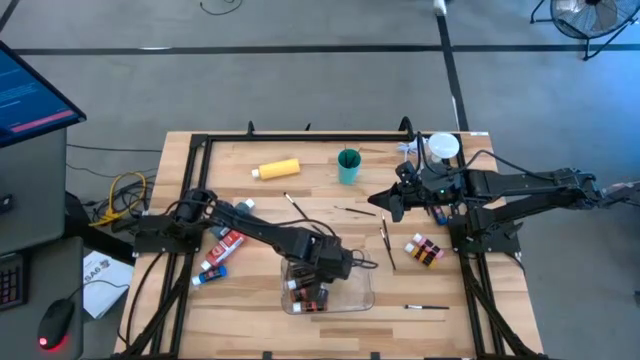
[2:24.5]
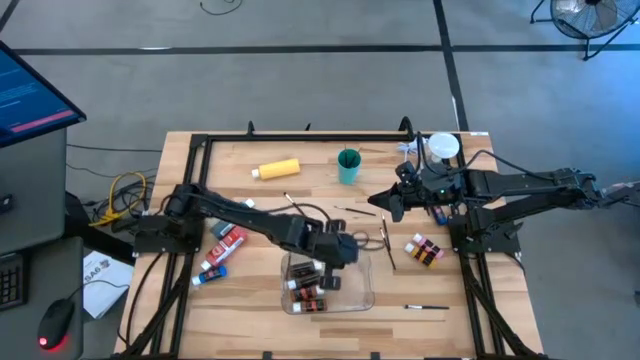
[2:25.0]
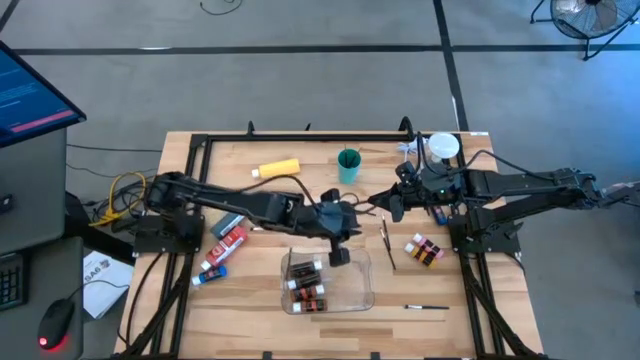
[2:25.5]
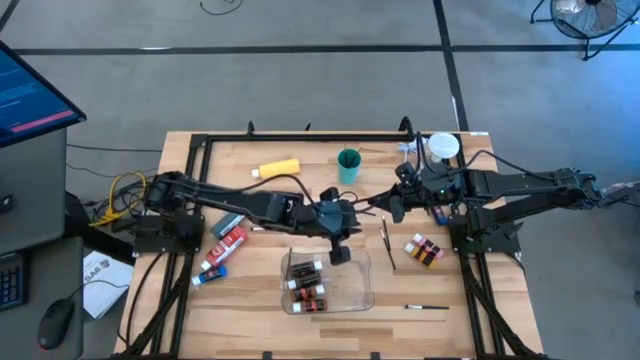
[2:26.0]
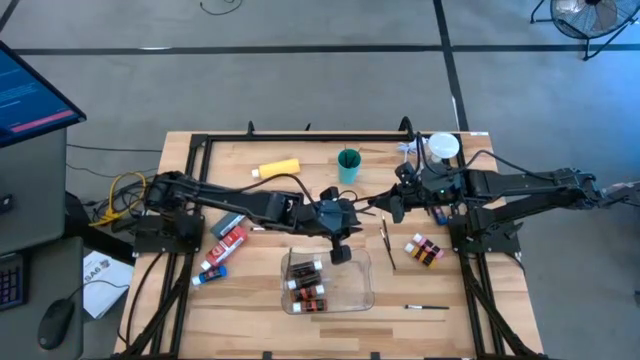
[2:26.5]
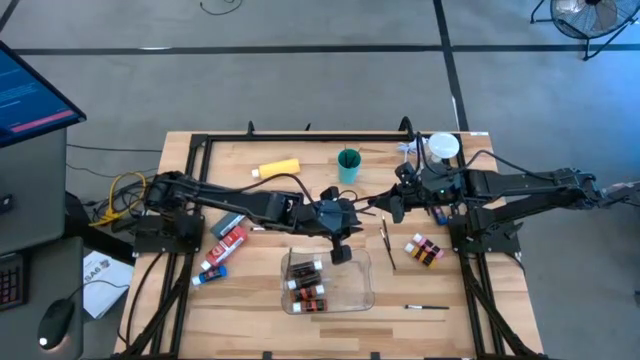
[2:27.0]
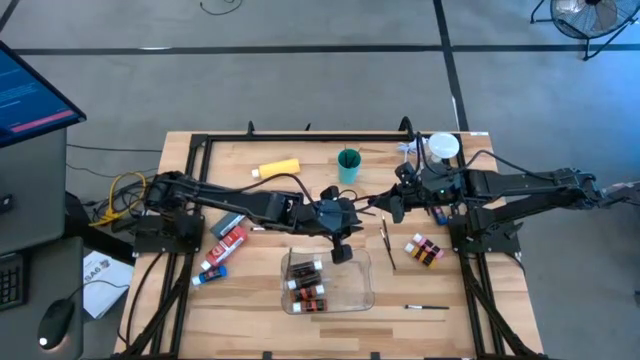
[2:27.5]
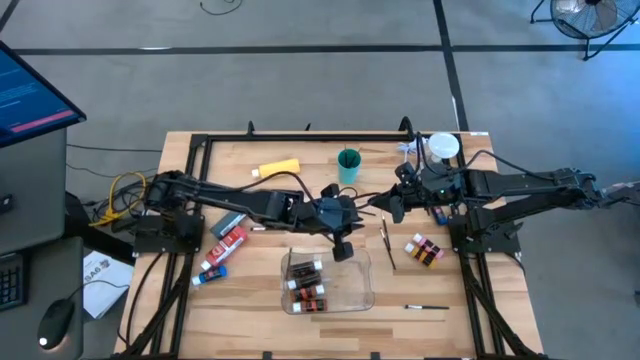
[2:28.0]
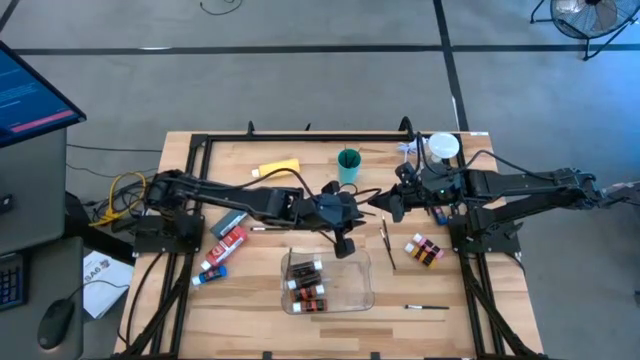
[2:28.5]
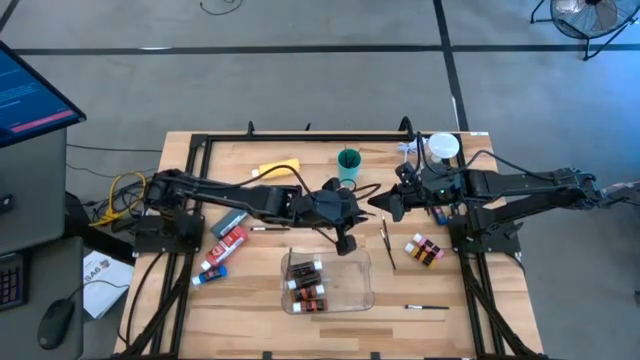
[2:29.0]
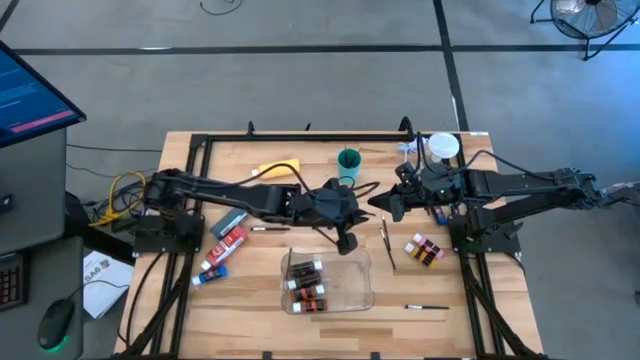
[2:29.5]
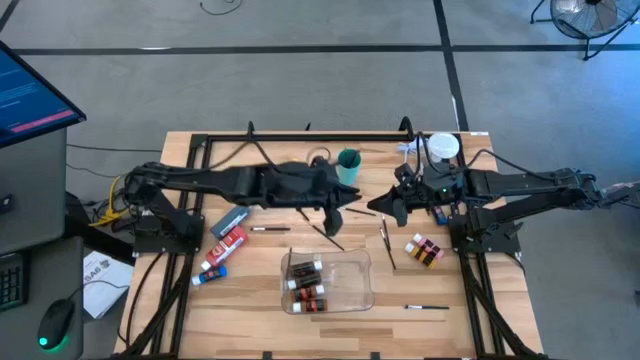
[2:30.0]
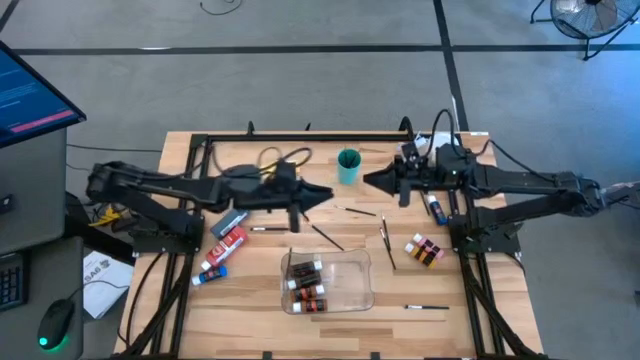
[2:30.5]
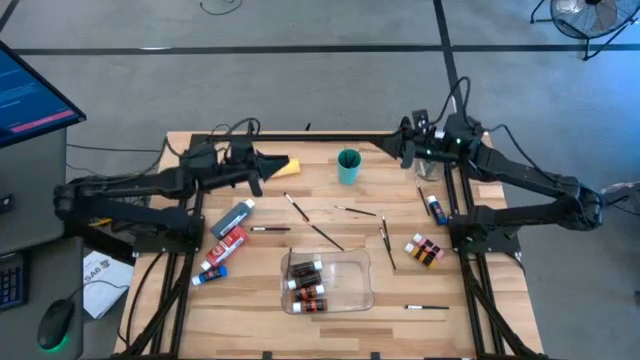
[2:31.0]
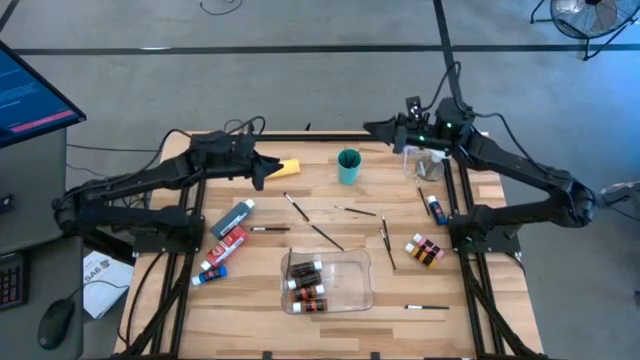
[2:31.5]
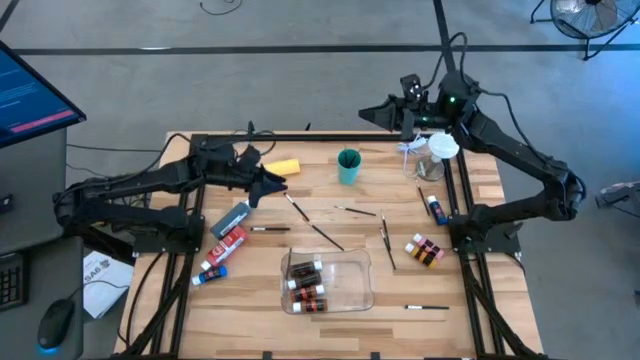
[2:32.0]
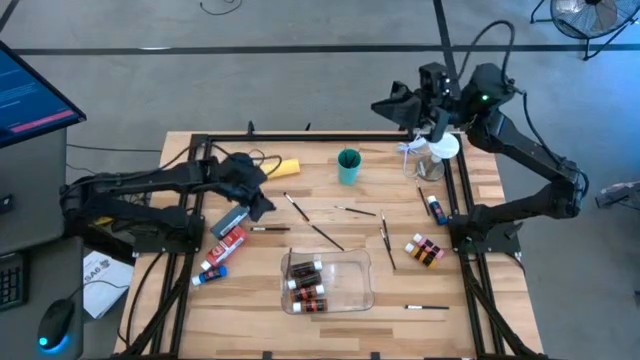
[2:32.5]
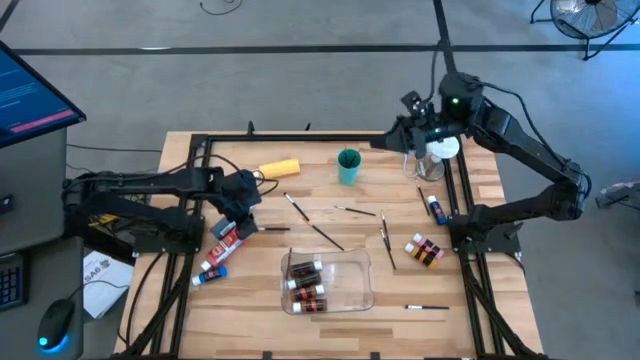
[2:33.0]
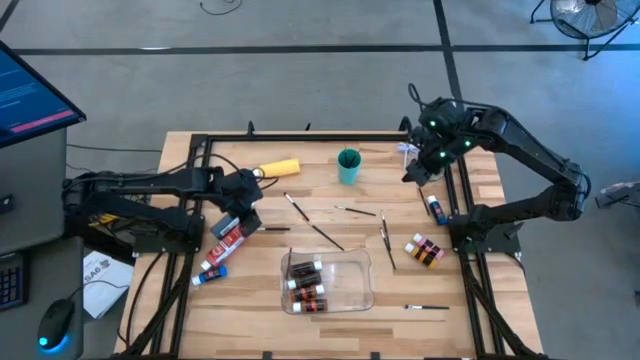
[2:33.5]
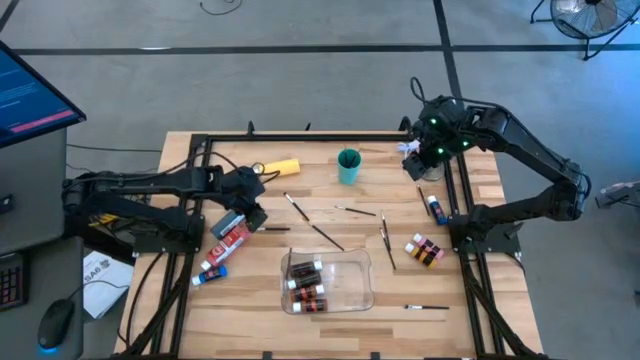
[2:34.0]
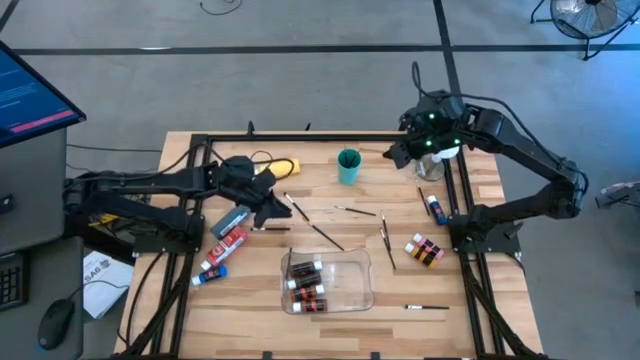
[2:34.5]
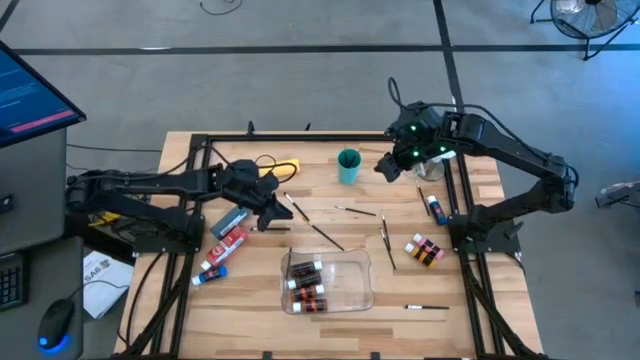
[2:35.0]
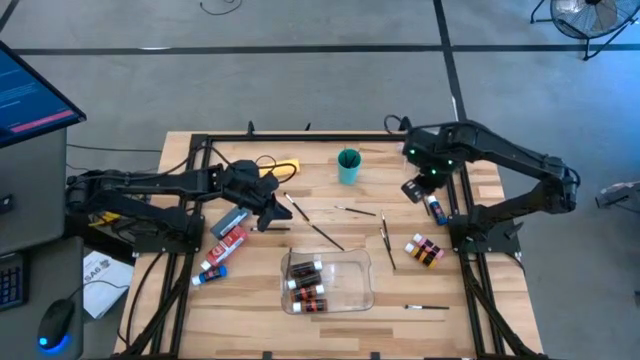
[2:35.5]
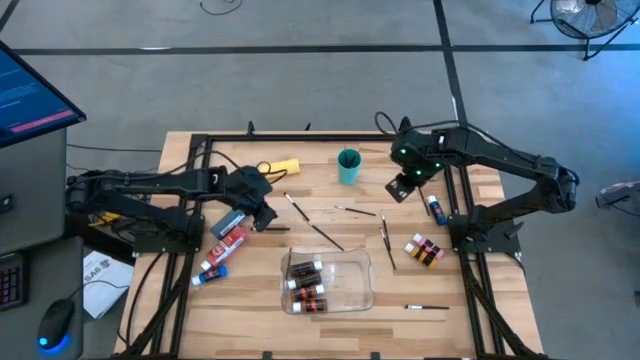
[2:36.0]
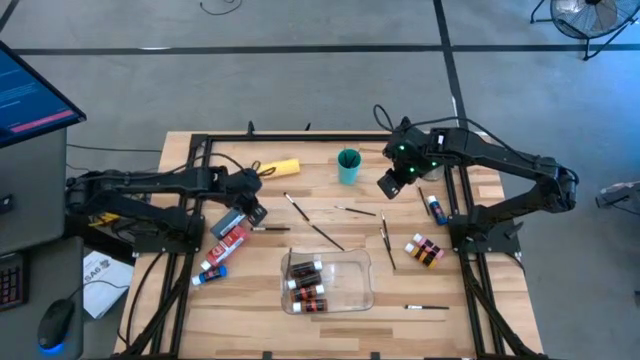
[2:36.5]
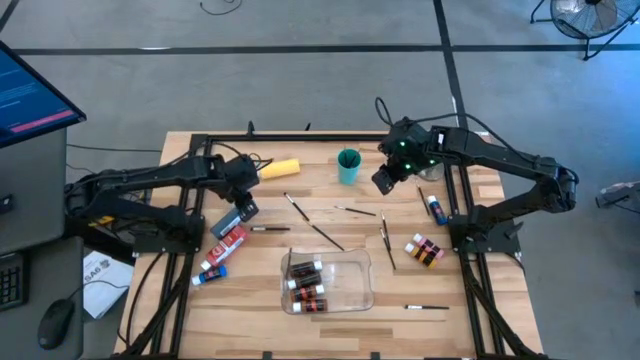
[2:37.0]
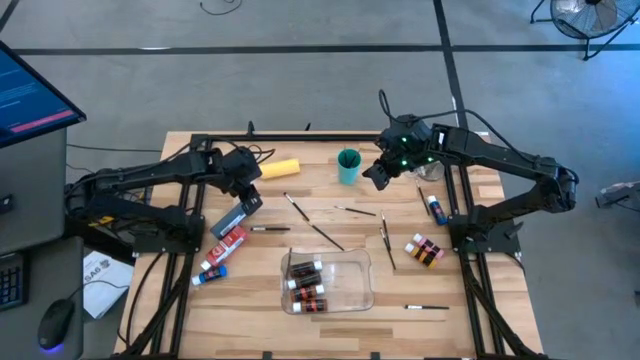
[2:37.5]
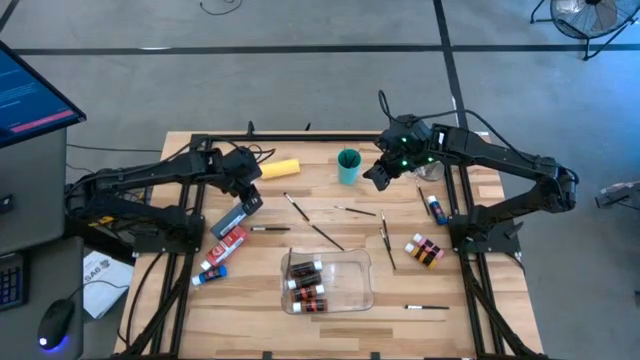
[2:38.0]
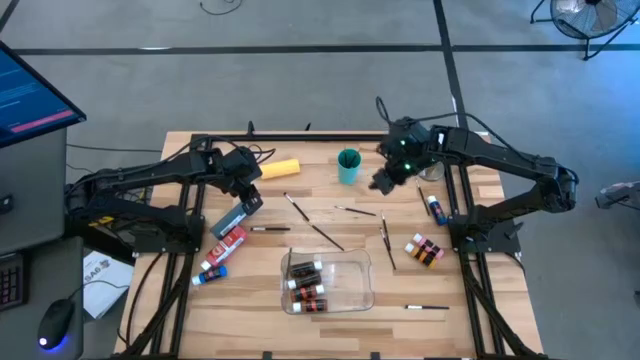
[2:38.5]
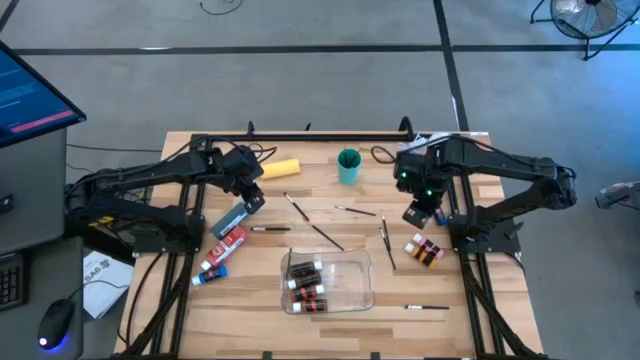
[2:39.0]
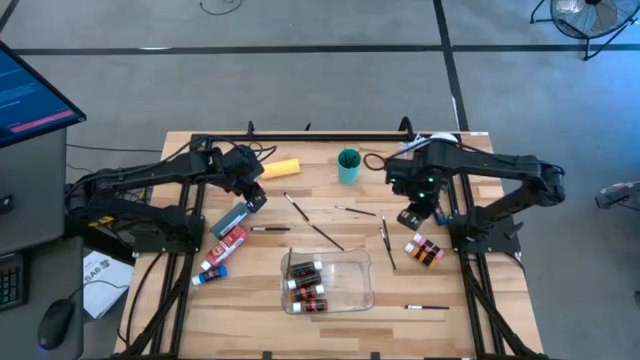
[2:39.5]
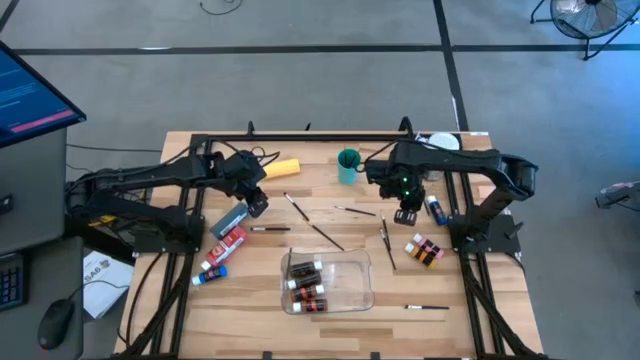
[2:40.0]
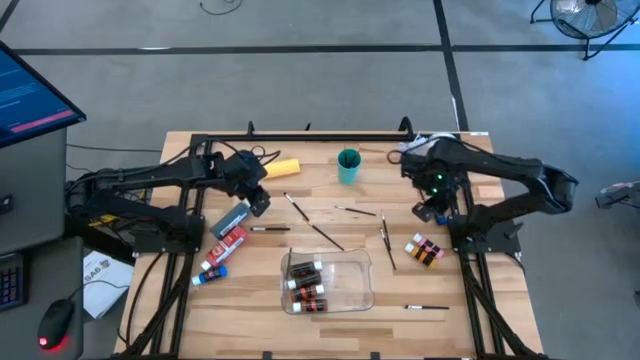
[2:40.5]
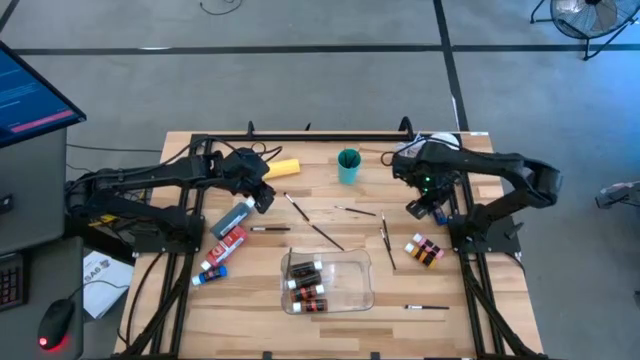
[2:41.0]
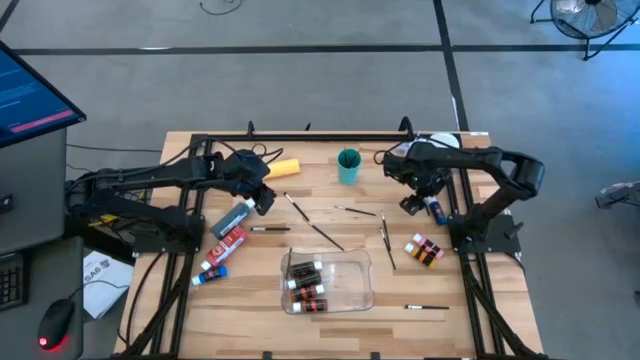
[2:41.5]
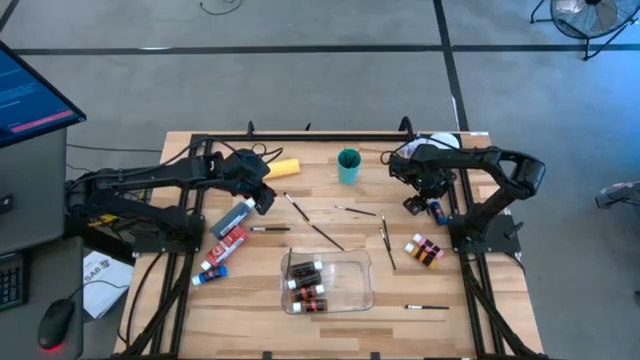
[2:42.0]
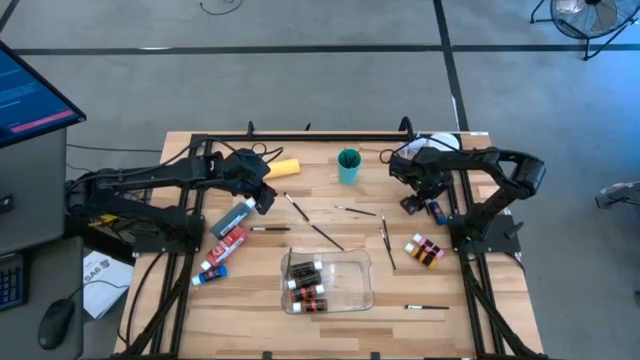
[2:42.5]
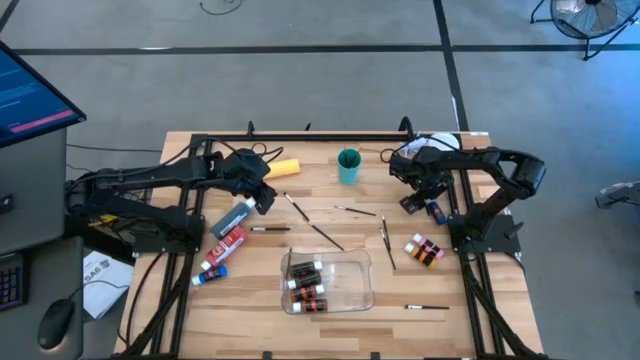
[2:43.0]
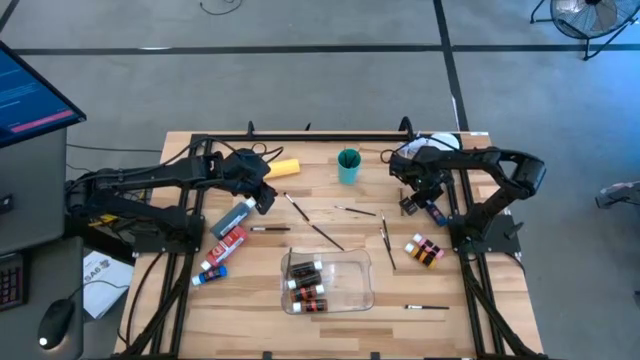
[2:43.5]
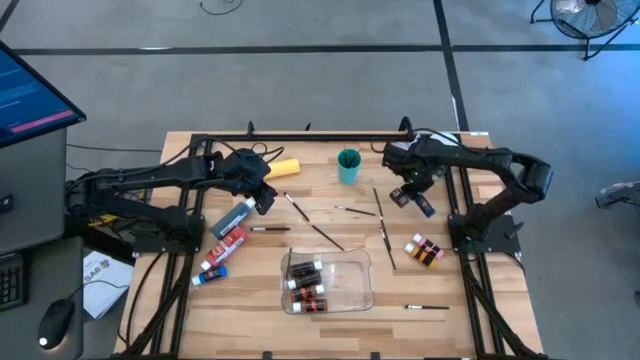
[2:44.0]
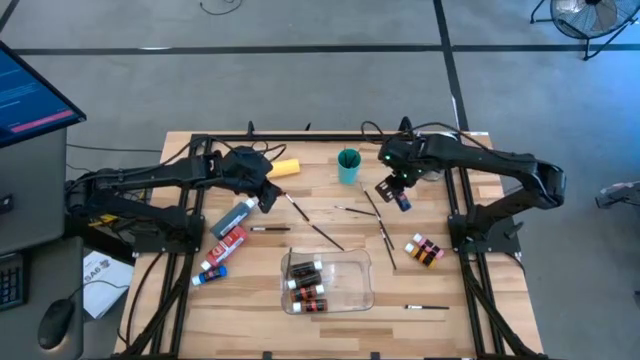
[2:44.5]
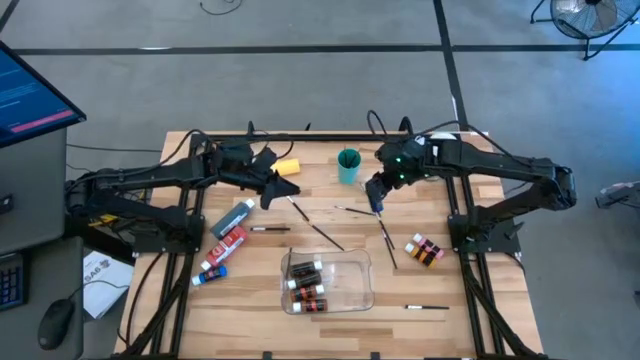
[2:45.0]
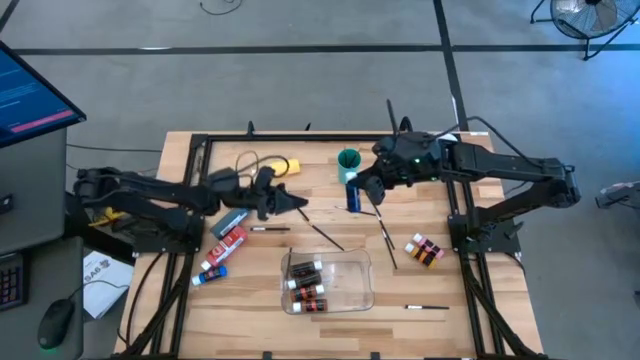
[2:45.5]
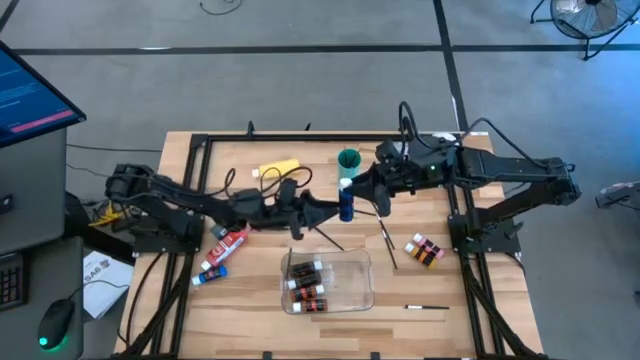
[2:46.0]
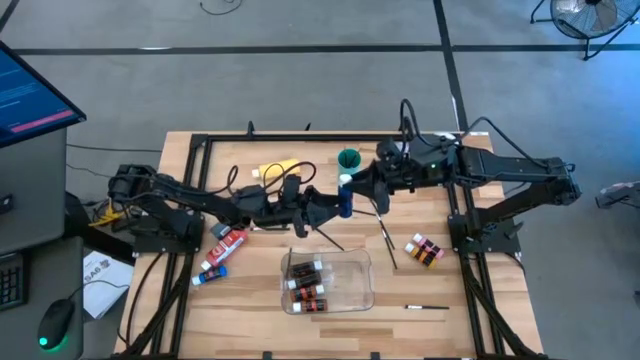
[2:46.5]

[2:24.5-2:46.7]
Task: Pick & Place Paint Supplies
Put the blue paint bottle into the transparent bin
